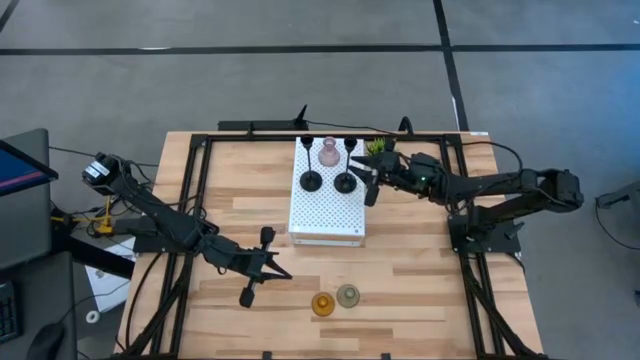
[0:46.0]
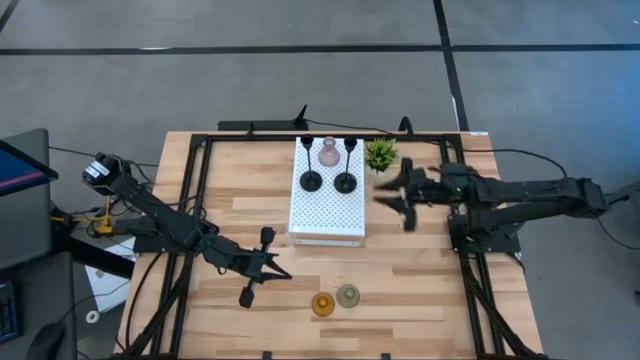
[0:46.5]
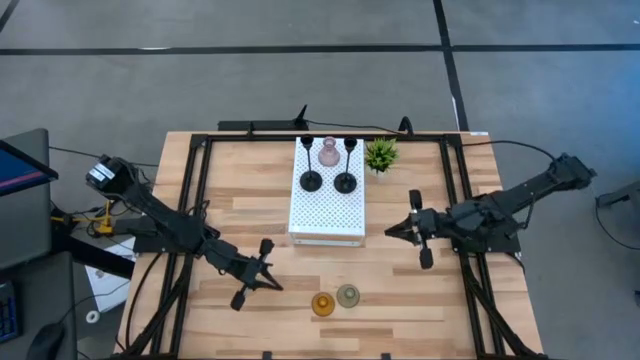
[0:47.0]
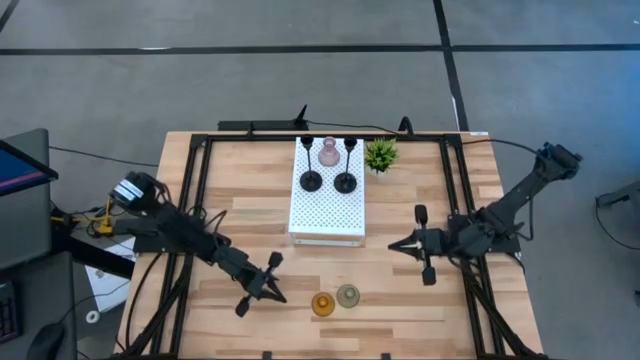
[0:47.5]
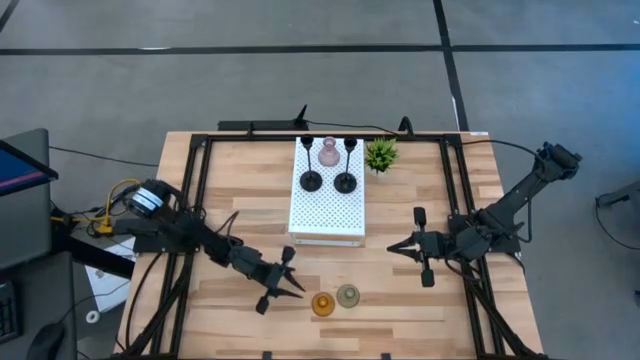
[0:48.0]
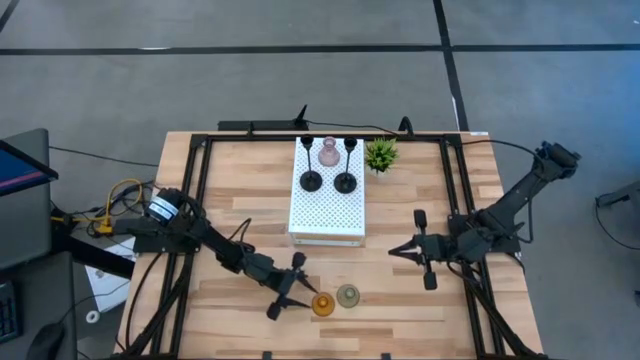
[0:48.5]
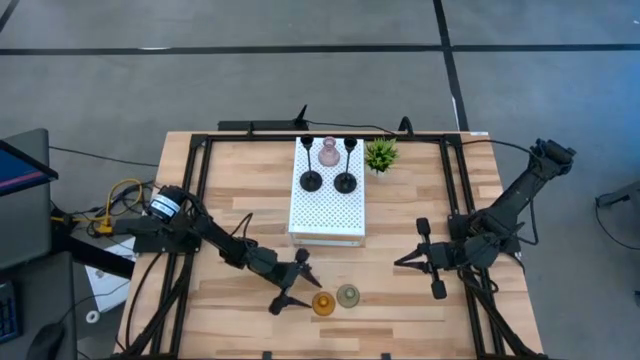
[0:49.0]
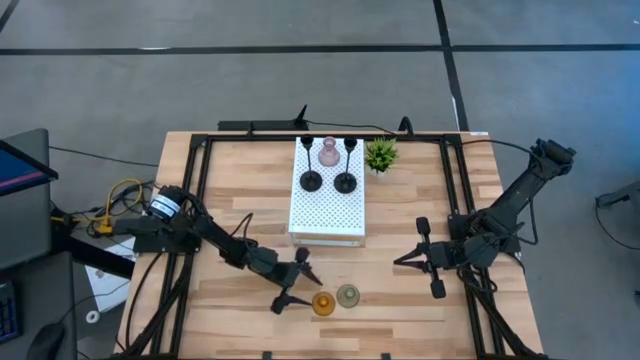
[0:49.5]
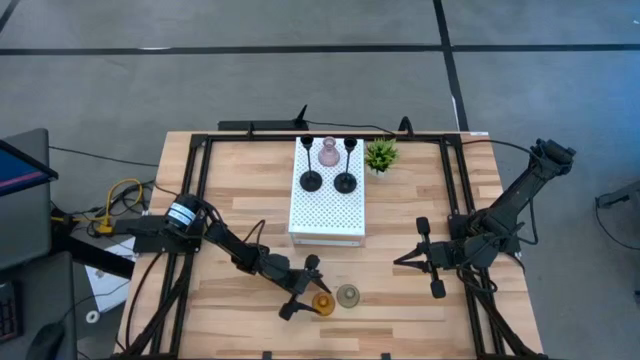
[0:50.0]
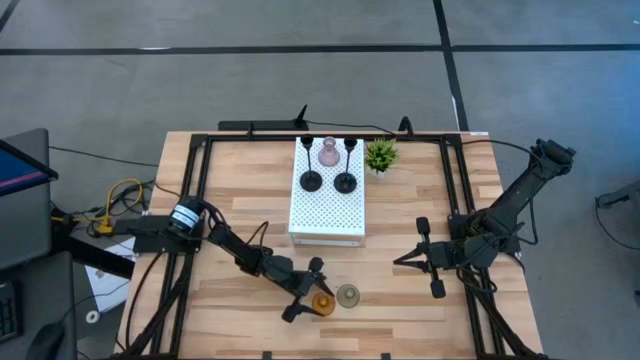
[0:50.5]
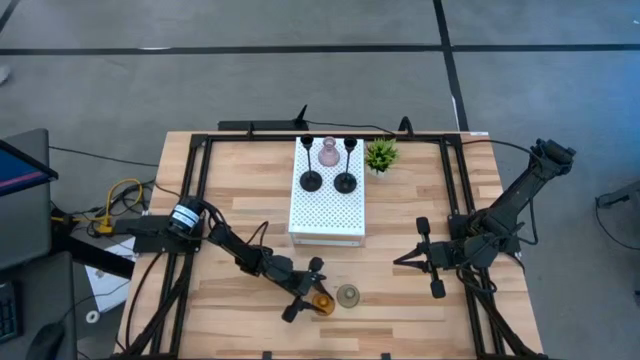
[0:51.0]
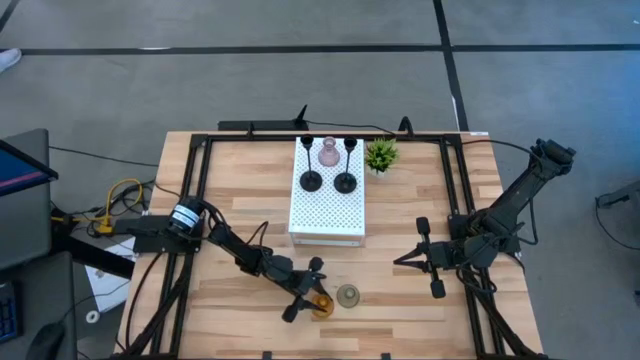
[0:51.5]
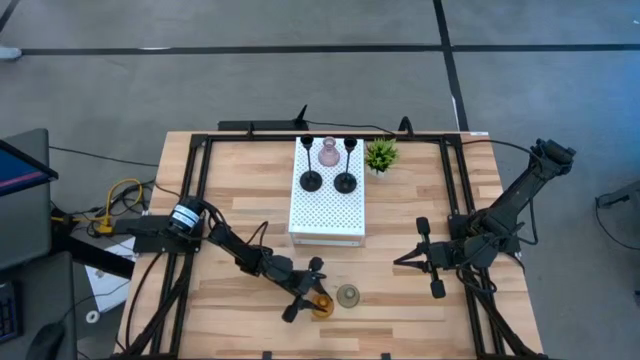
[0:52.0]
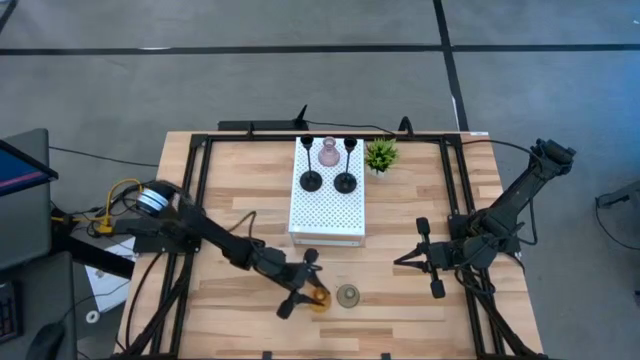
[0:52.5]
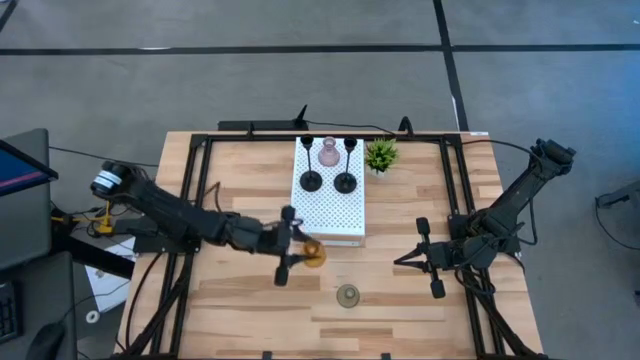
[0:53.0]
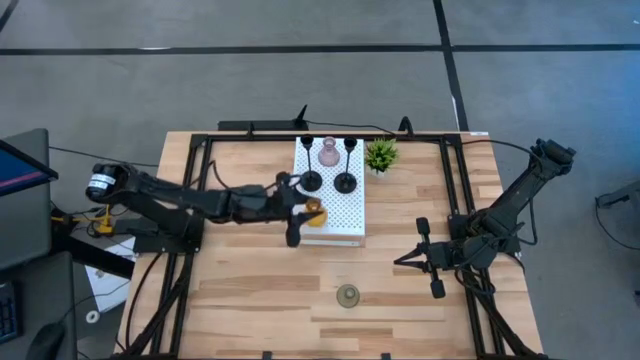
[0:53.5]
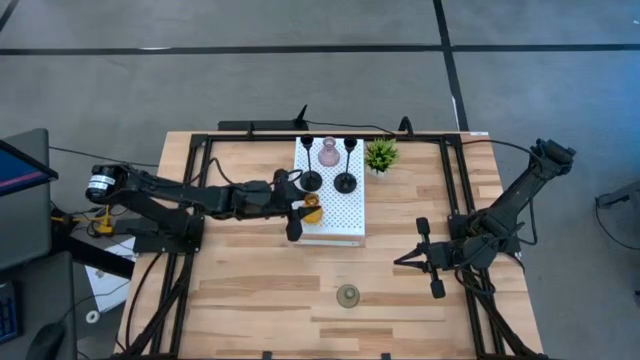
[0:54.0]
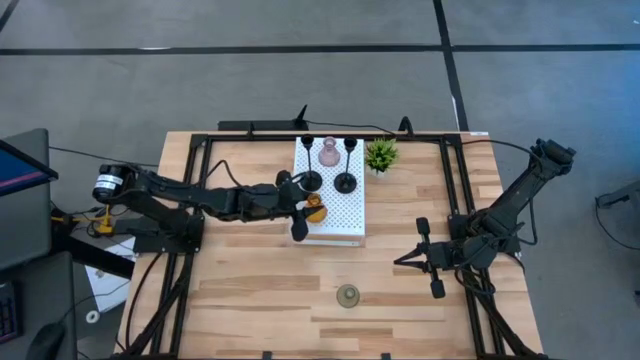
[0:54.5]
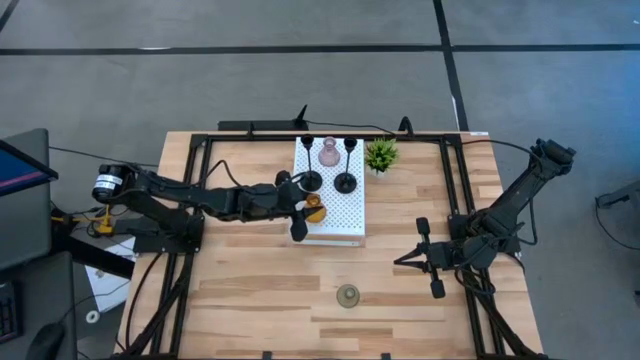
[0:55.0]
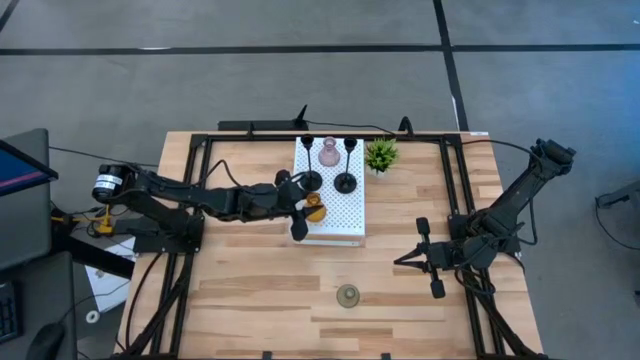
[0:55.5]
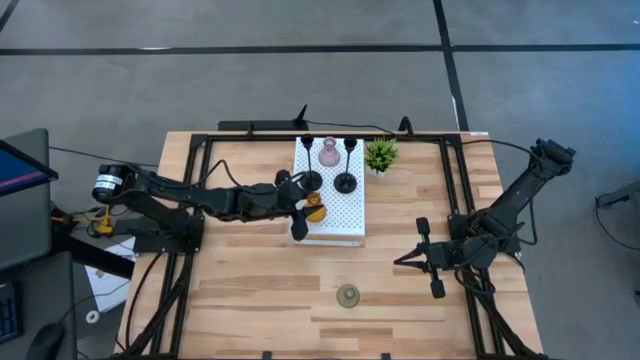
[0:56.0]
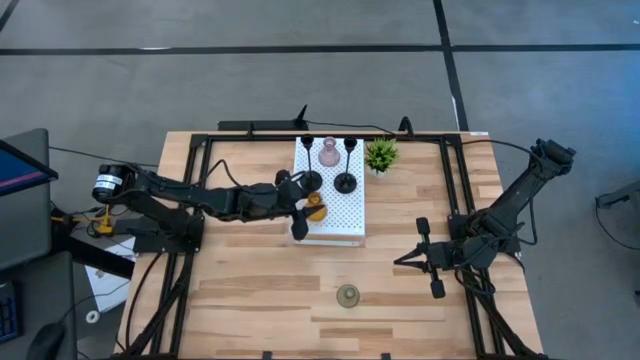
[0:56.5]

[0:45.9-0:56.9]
Task: Pick & Place candle stick holders
Put the orange glass candle holder on the shelf

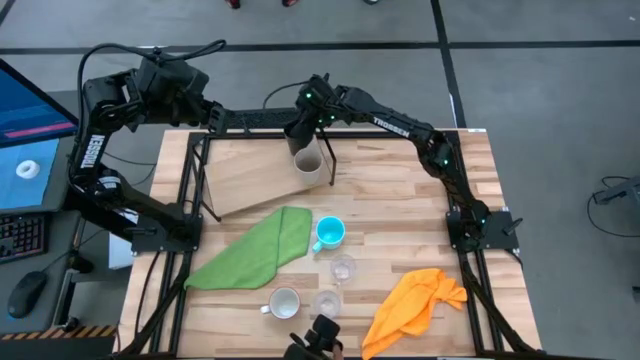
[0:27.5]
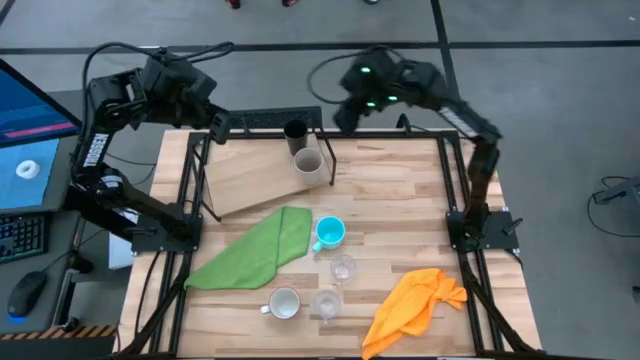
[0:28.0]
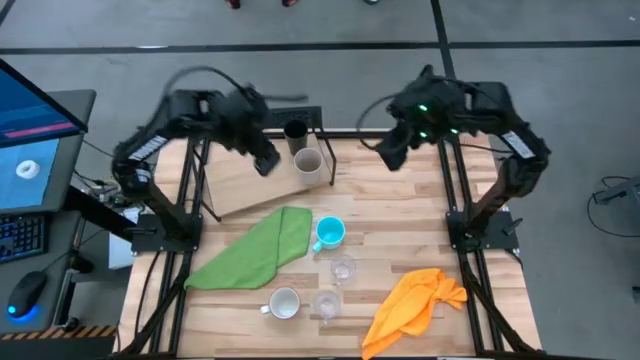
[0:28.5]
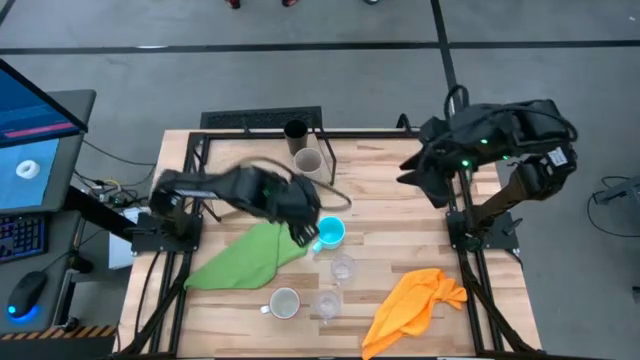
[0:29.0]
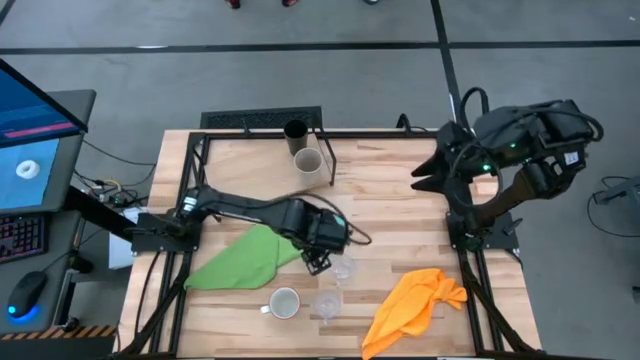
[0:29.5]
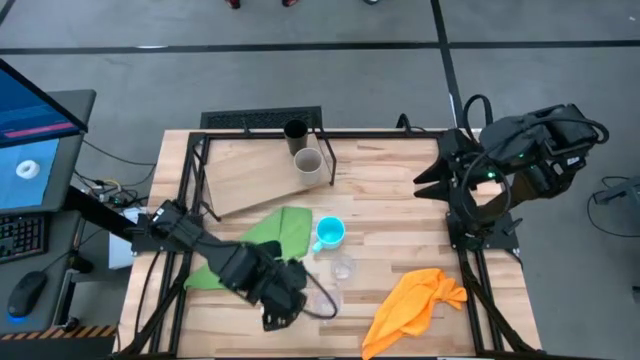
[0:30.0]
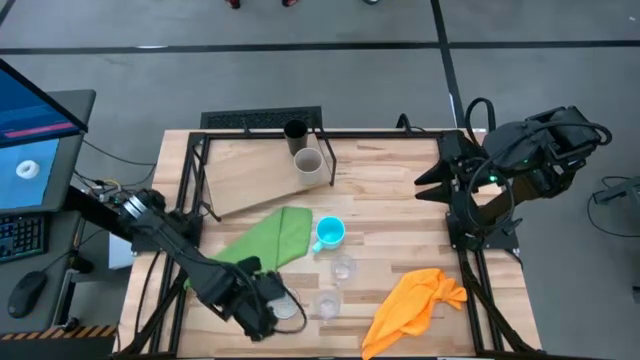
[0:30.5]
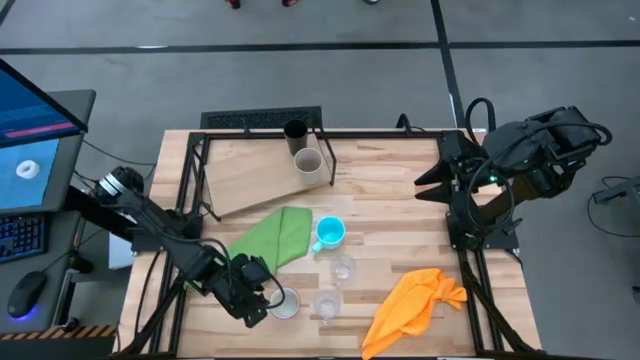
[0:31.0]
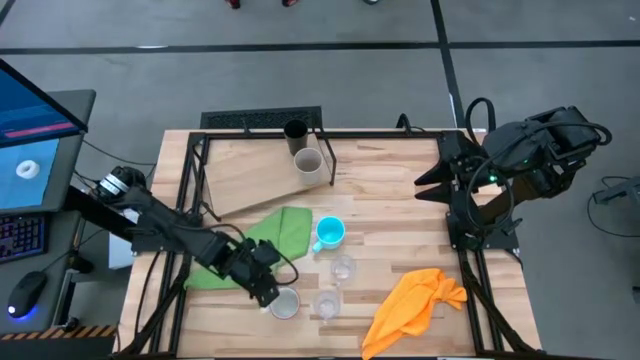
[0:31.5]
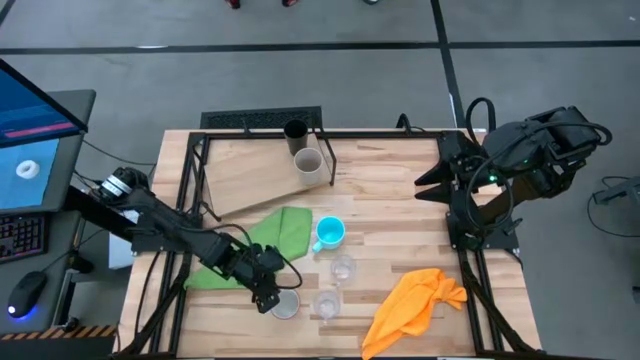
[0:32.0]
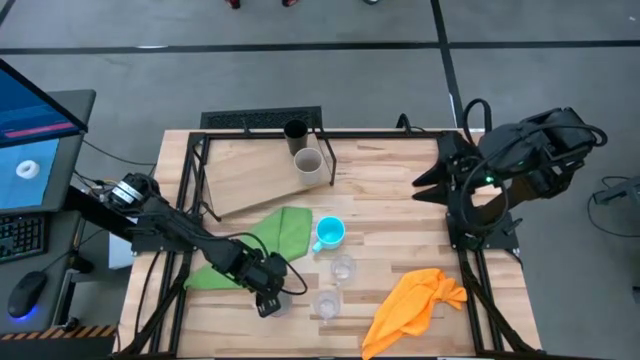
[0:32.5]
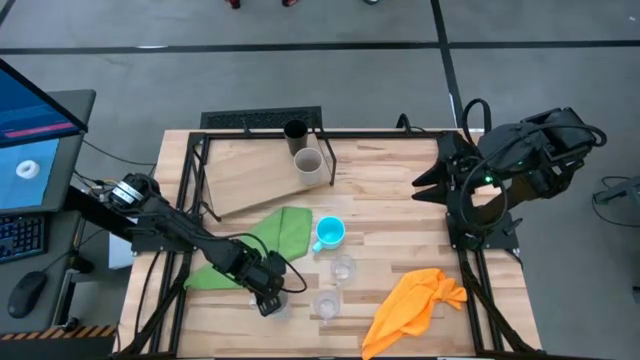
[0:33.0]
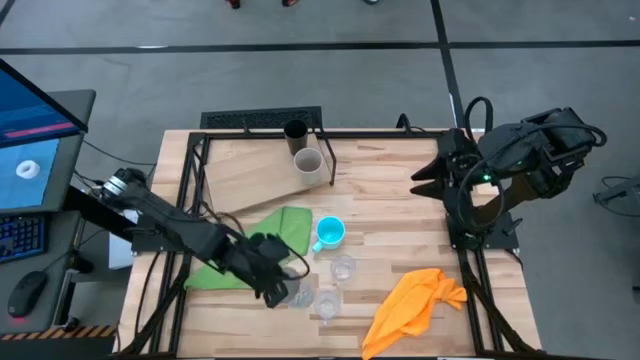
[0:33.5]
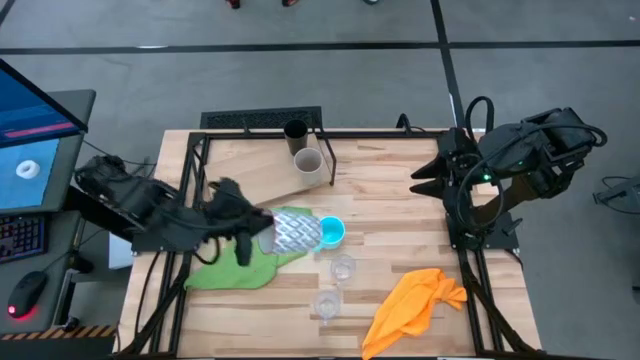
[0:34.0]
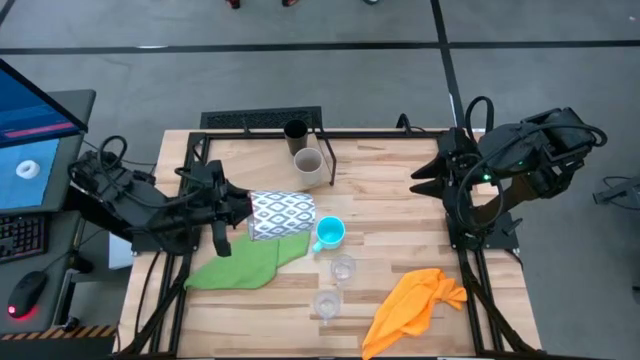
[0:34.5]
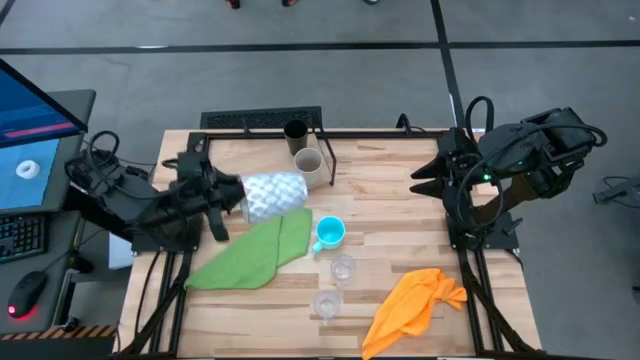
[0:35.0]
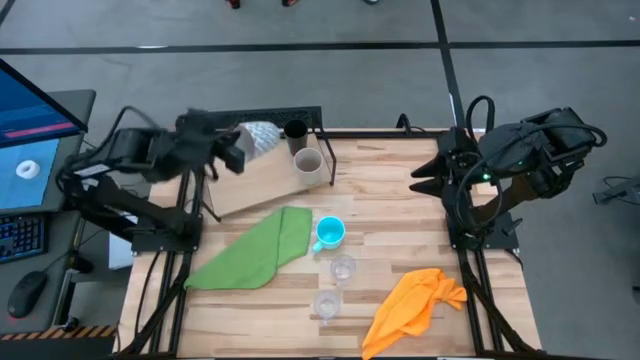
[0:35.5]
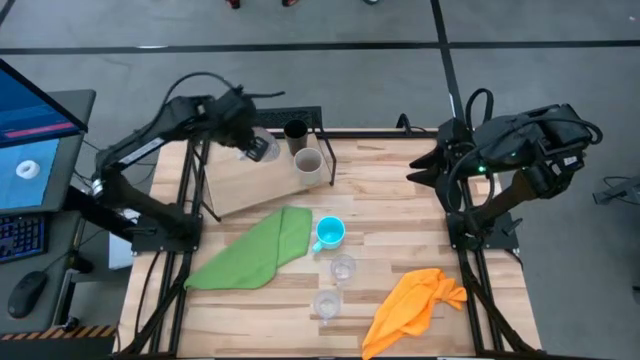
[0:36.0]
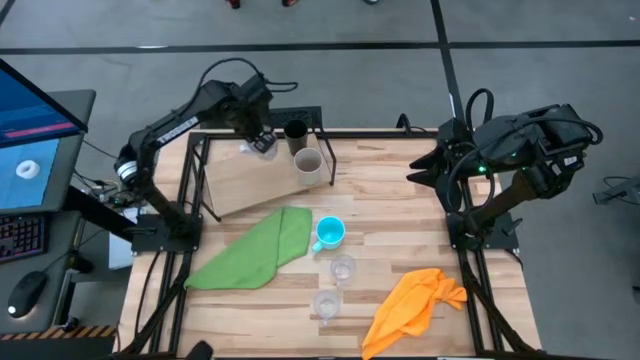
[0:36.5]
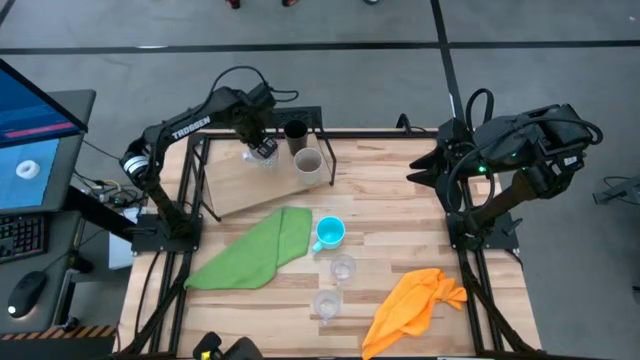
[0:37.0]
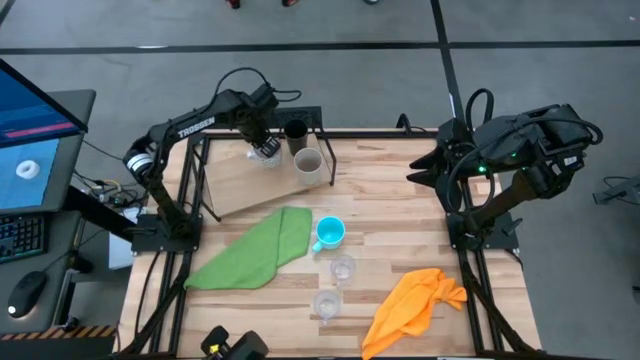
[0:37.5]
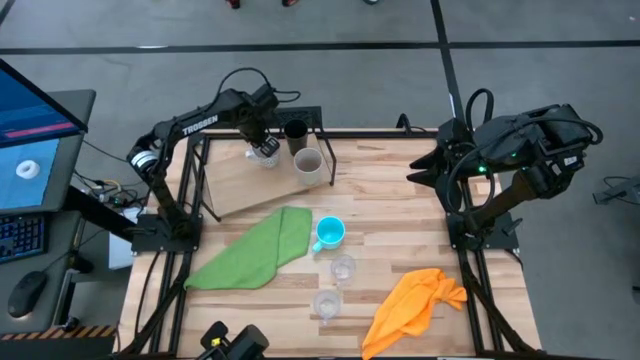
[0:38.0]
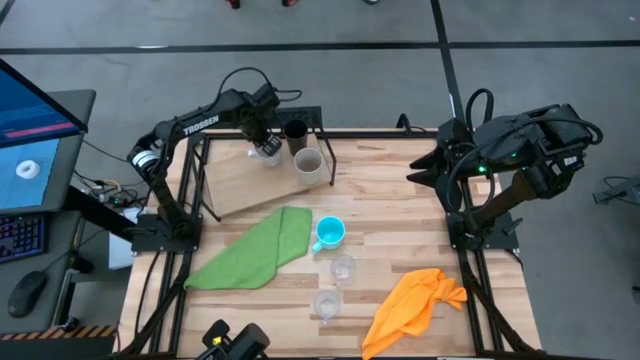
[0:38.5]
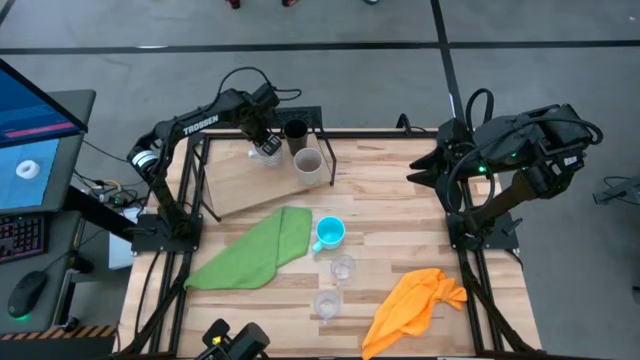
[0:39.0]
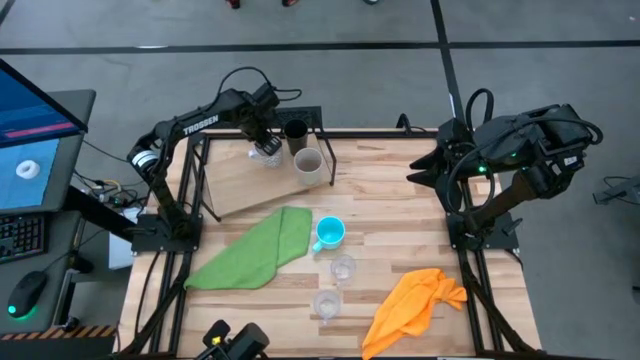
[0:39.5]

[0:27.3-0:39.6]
Task: Stack small to large cups/mugs on shelf
Put the white mug on the shelf
